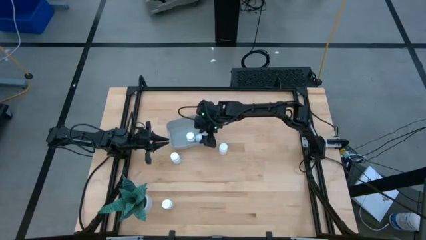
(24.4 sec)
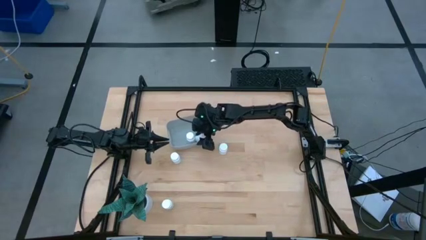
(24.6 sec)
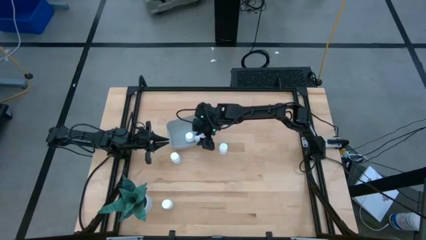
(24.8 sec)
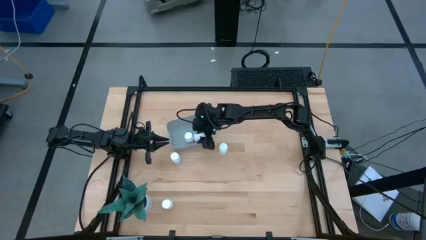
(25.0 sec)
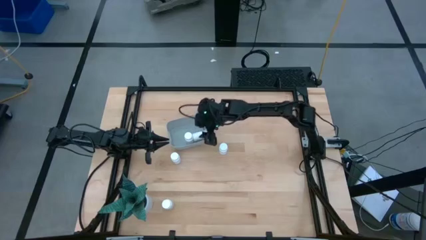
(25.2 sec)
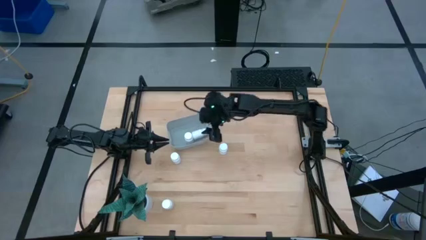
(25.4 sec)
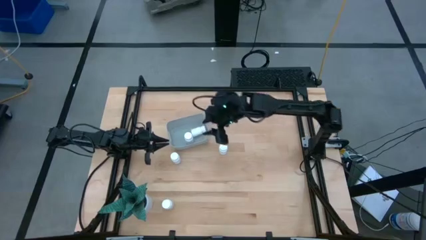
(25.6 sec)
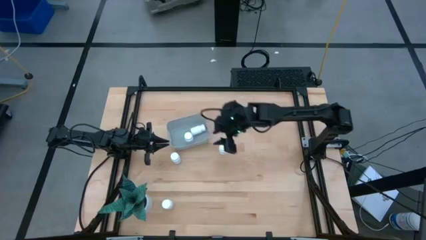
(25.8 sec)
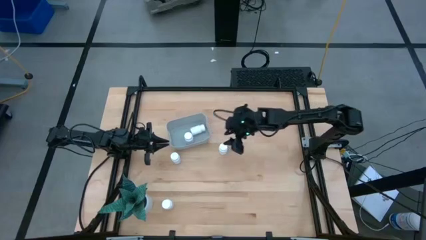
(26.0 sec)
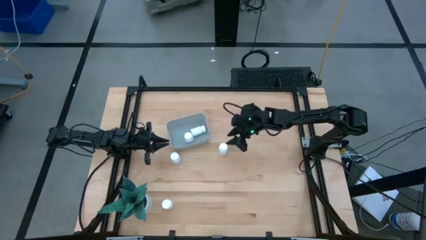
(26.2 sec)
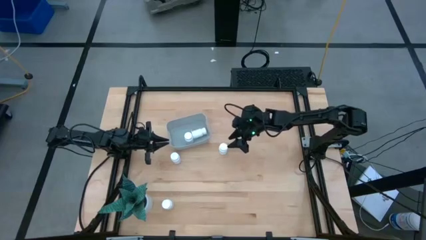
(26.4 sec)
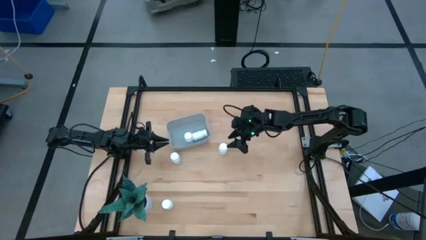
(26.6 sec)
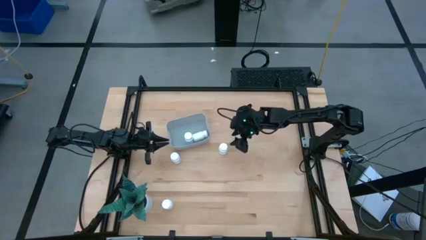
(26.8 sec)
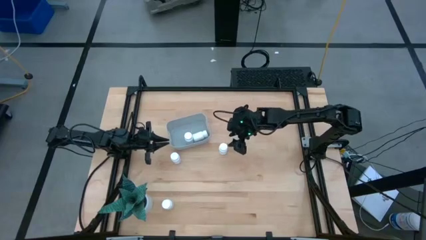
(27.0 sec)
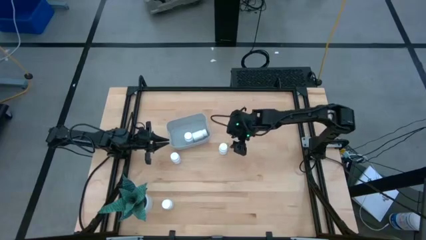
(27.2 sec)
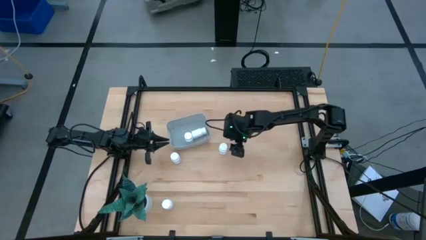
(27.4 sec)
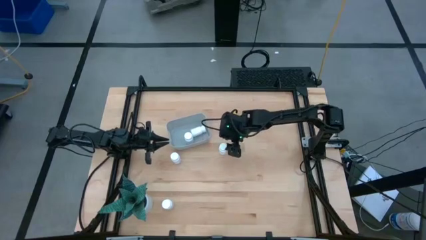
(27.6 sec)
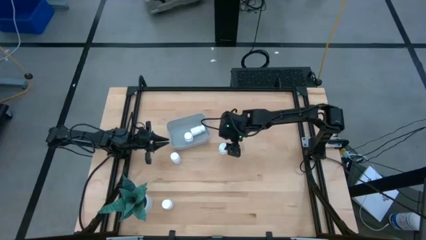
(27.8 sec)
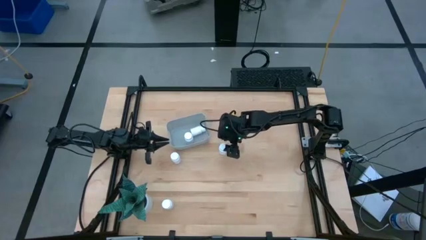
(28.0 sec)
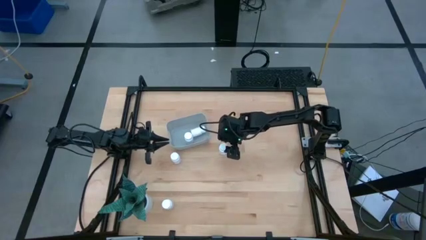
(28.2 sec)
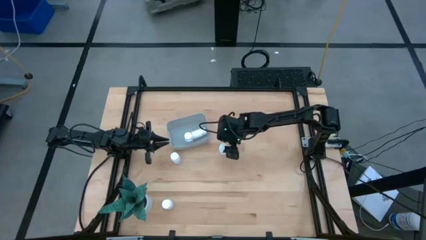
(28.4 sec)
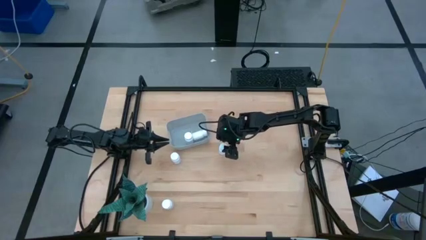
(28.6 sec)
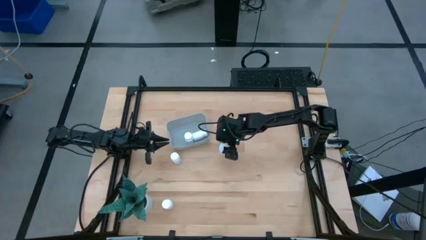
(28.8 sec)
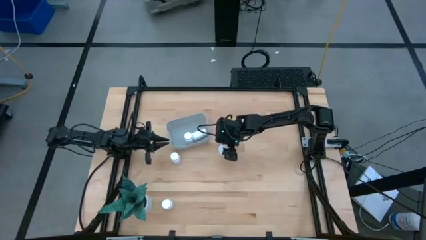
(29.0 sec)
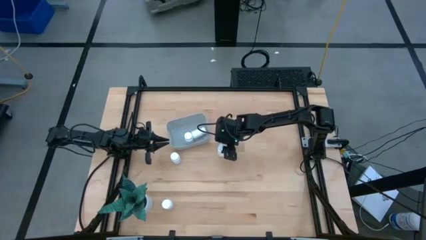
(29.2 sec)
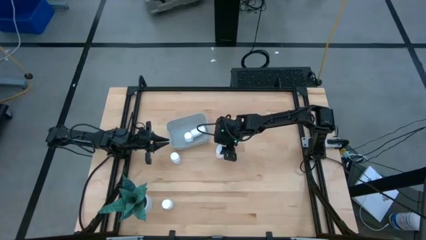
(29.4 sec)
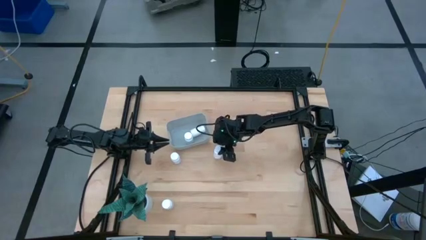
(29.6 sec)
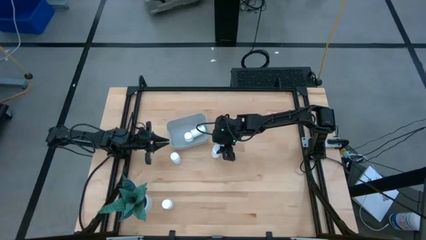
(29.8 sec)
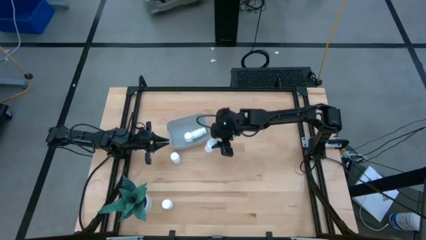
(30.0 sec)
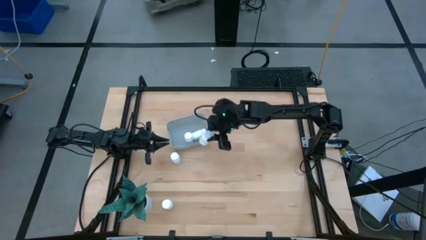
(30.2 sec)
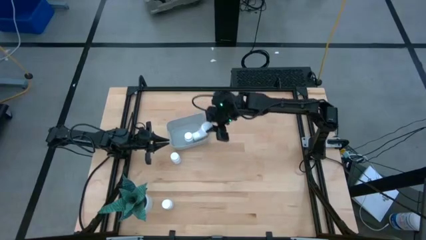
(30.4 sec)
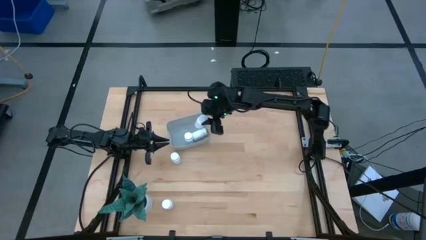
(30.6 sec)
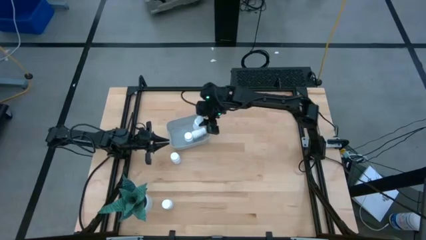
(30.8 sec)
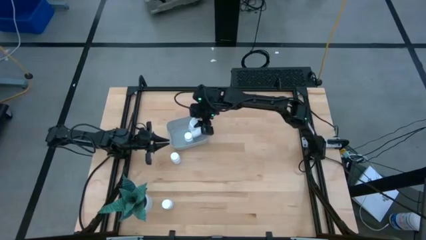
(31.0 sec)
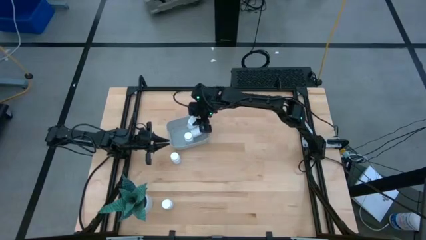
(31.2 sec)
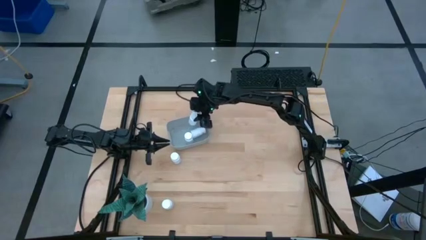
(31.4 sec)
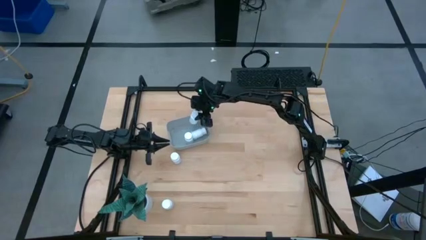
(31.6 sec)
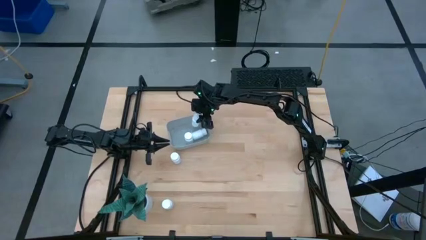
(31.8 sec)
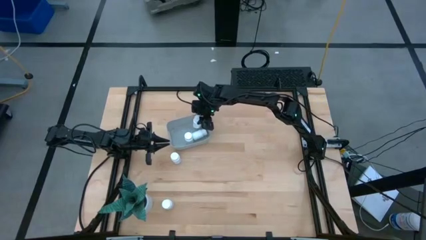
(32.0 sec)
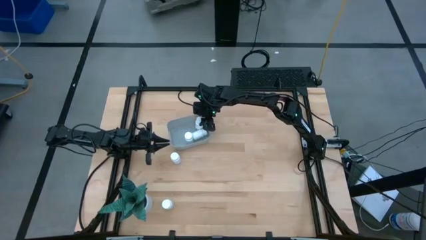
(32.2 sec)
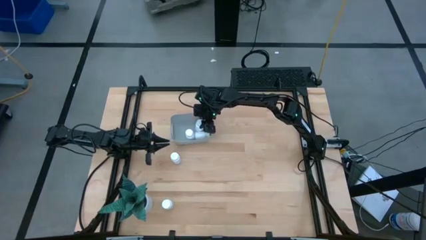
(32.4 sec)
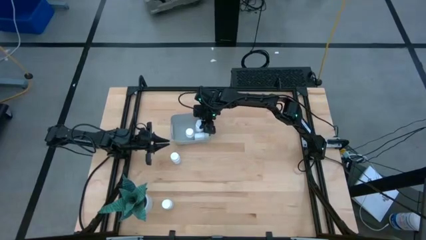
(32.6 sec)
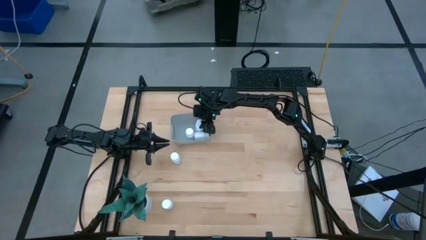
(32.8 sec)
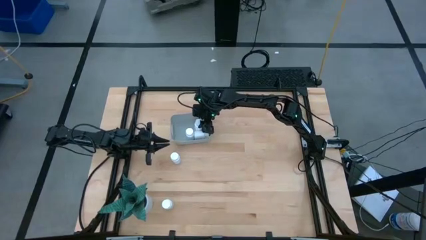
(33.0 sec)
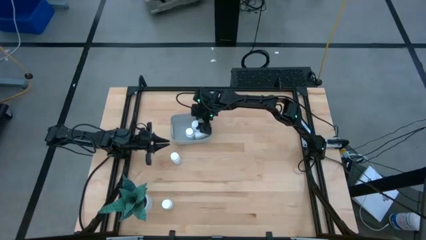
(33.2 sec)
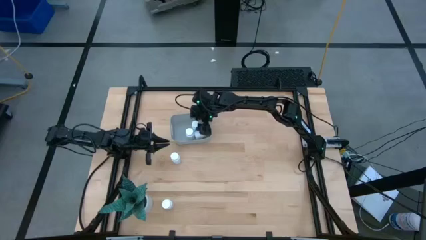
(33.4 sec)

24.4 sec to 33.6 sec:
Task: Pick and place pill bottles into a basket
Put the white pill bottle in the gray bin

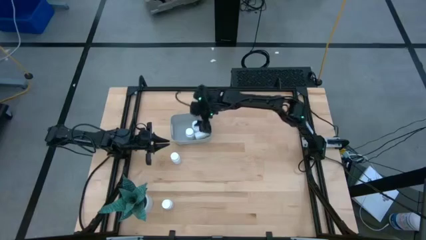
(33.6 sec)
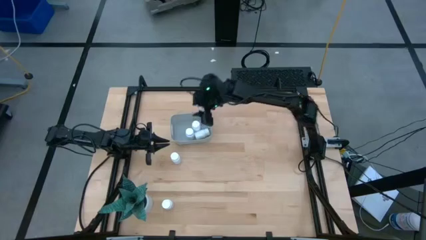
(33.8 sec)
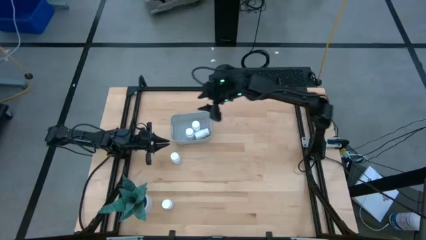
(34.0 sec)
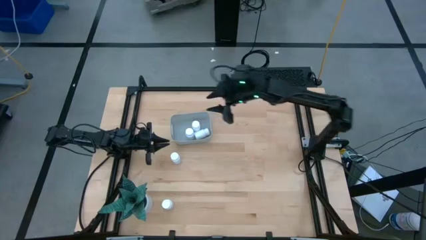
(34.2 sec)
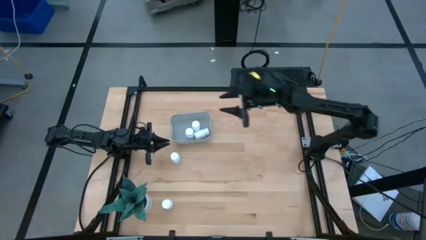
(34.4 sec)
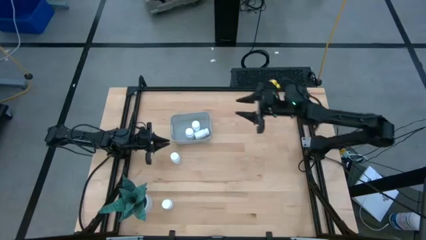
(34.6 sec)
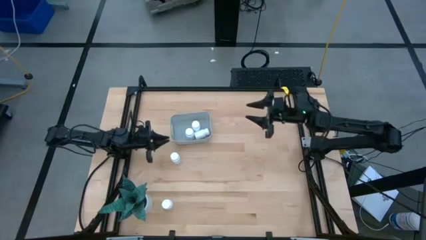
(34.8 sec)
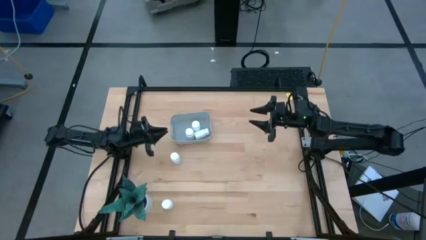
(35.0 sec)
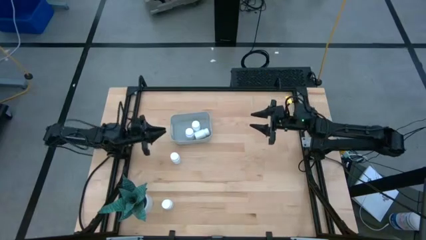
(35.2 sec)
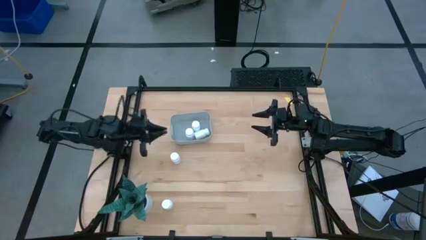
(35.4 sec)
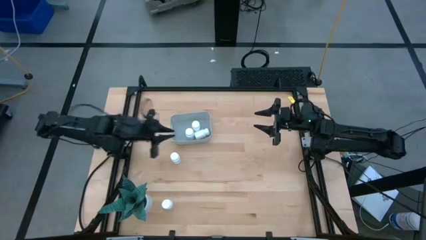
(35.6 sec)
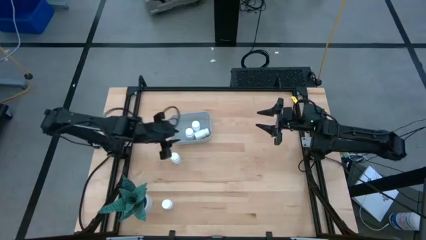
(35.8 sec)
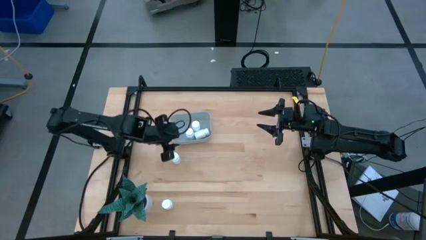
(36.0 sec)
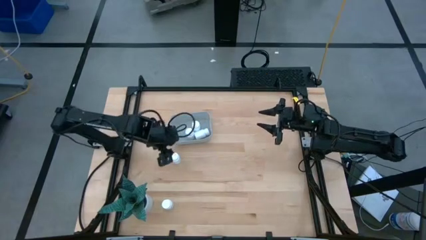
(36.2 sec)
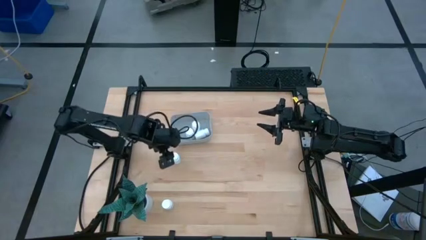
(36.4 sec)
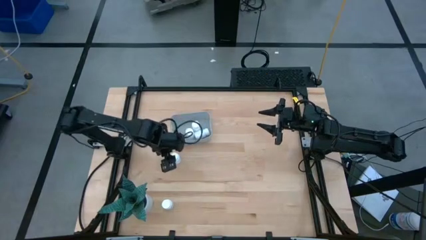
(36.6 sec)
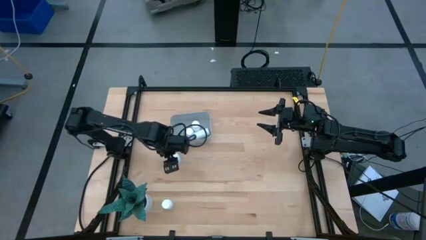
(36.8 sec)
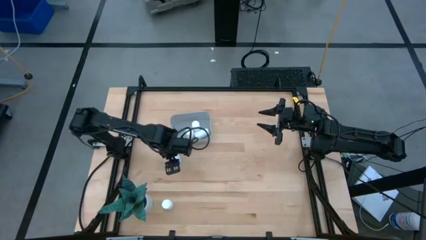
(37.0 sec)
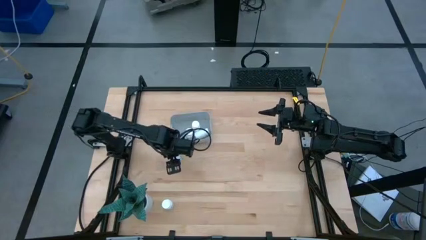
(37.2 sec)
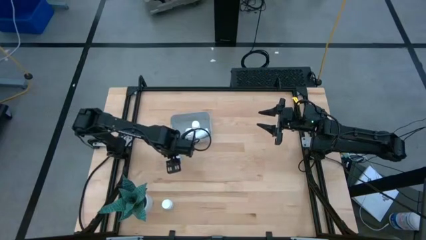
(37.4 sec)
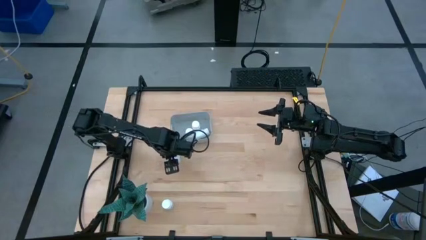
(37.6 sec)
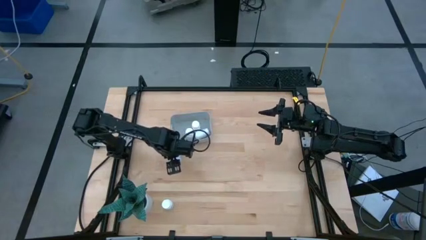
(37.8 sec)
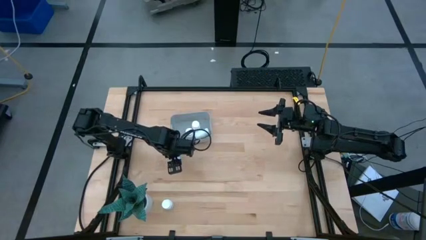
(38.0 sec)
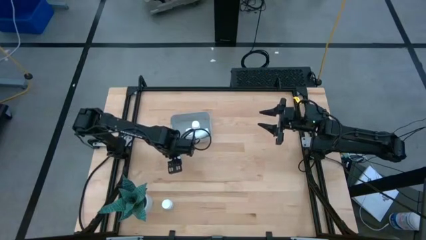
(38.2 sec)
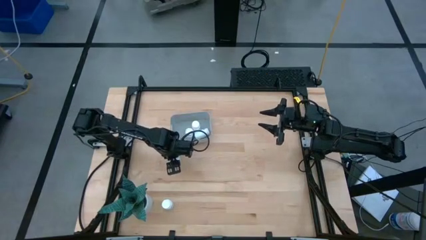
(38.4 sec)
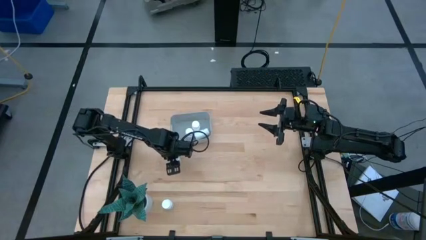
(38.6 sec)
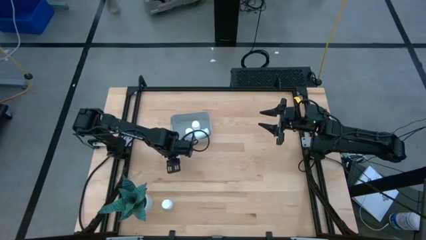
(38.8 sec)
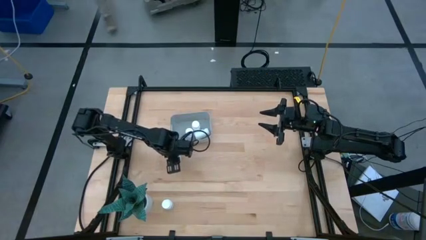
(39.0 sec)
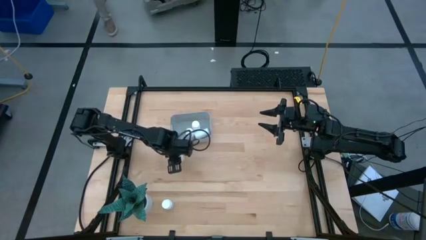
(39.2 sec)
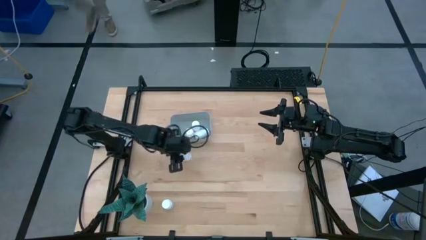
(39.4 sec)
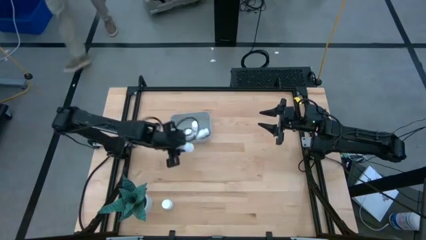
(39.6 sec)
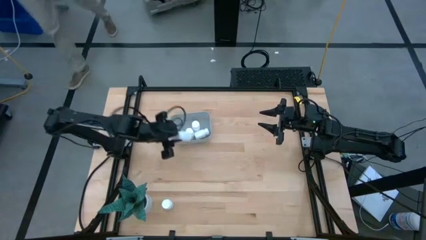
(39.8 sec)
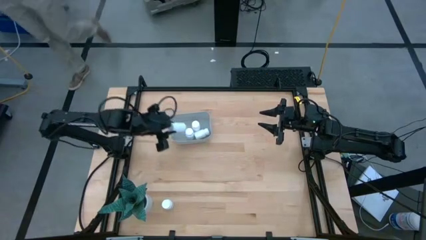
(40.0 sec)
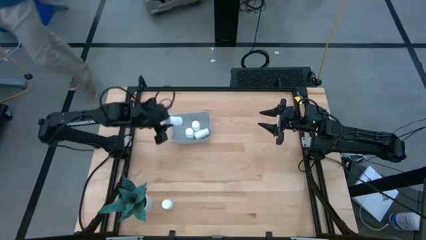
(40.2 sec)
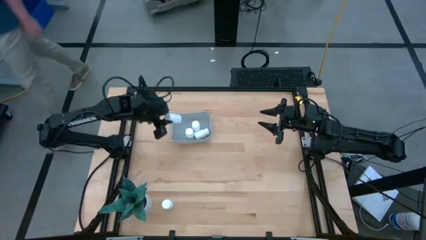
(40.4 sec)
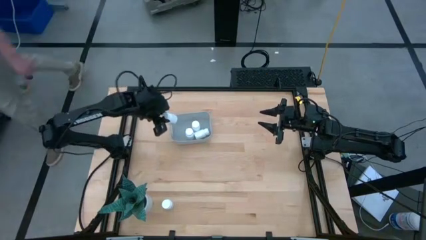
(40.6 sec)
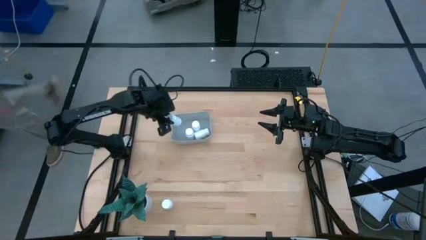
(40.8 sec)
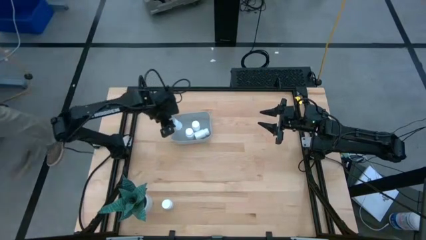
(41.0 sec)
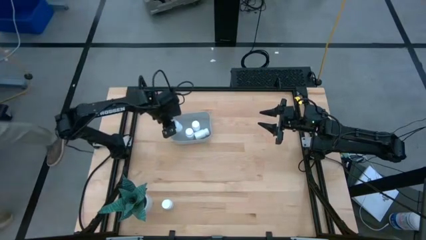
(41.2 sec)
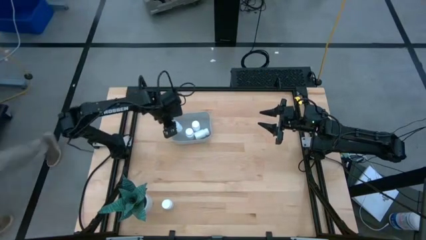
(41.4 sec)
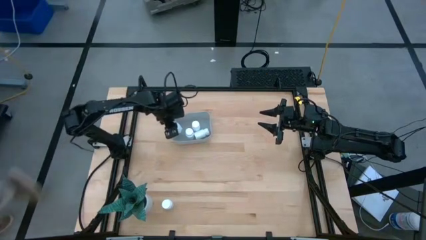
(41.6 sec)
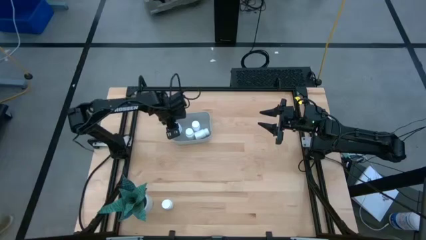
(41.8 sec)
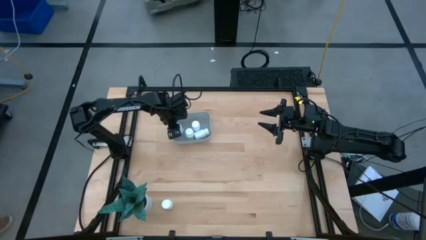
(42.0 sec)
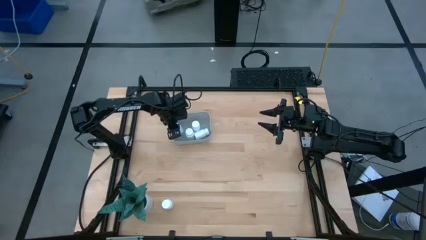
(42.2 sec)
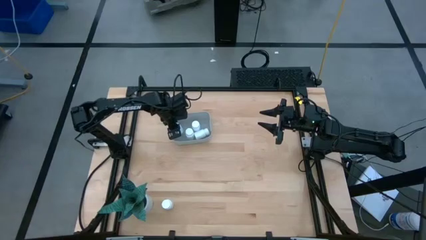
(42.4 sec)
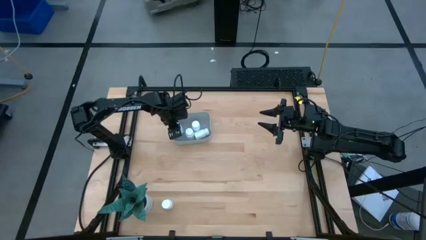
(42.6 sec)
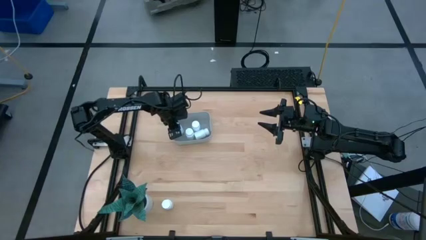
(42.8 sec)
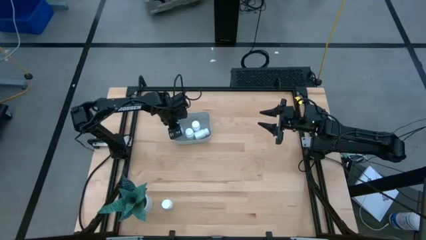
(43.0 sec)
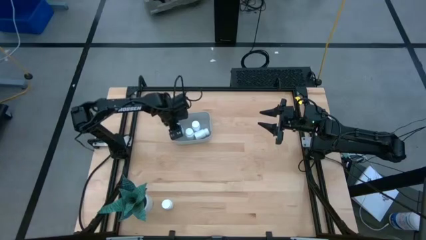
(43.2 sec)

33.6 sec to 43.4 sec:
Put the white pill bottle in the gray bin
